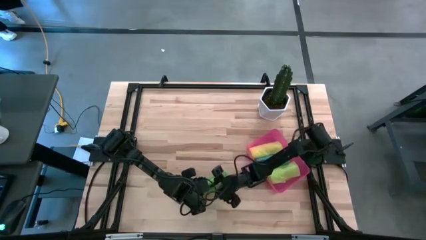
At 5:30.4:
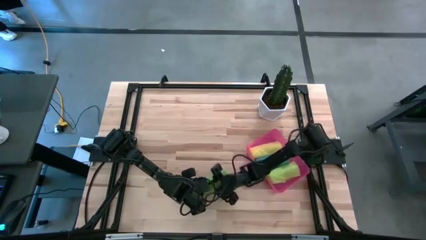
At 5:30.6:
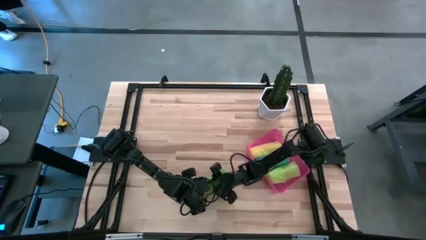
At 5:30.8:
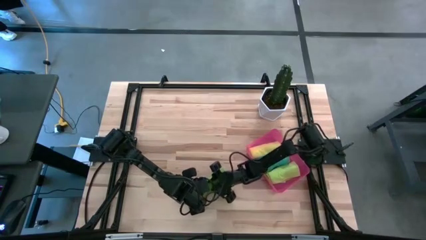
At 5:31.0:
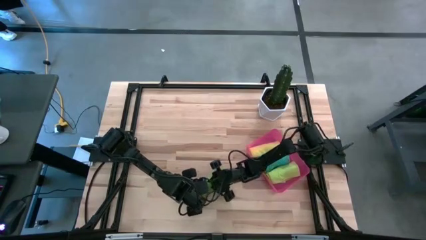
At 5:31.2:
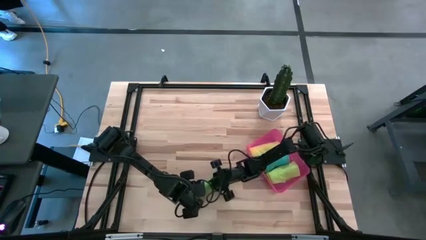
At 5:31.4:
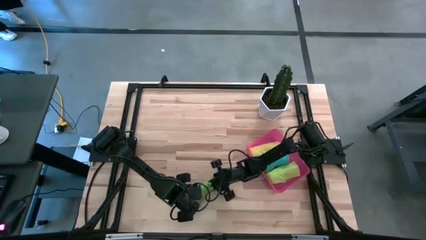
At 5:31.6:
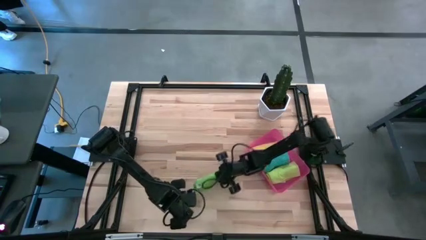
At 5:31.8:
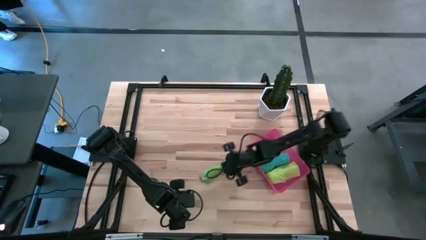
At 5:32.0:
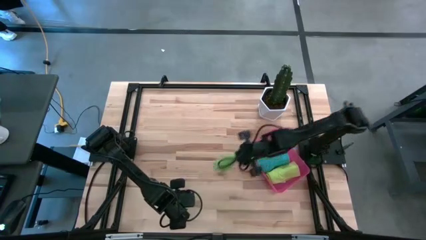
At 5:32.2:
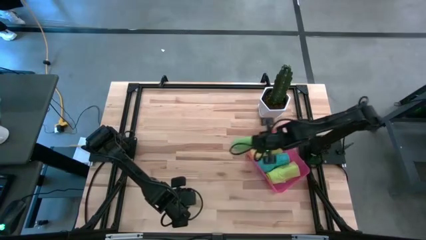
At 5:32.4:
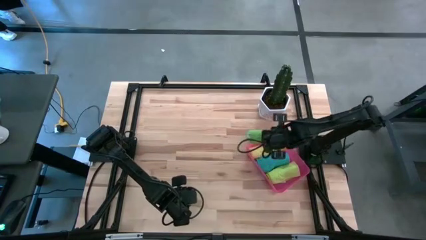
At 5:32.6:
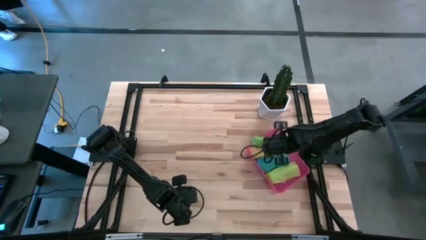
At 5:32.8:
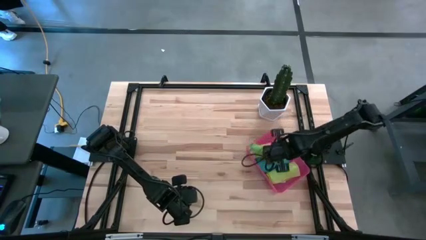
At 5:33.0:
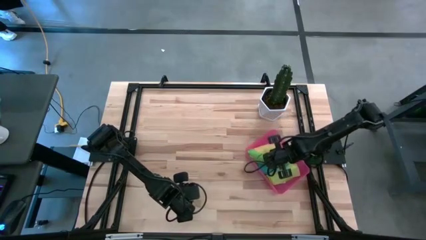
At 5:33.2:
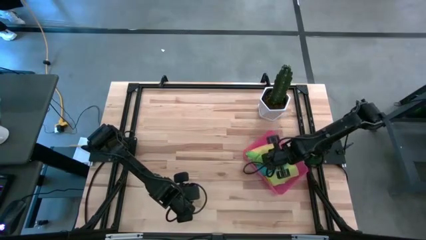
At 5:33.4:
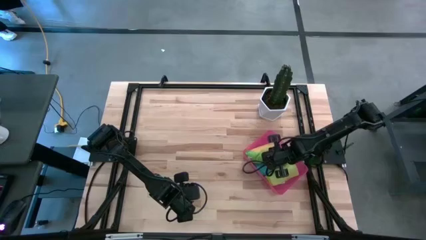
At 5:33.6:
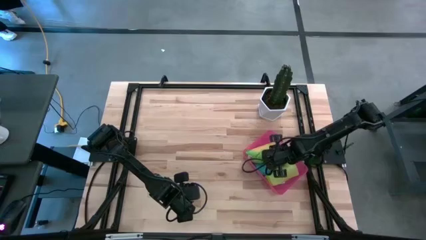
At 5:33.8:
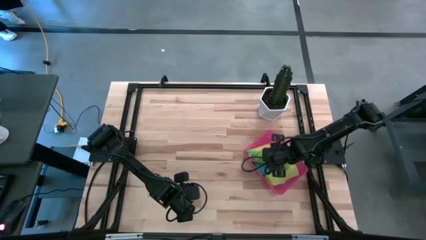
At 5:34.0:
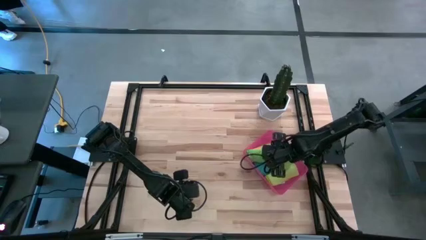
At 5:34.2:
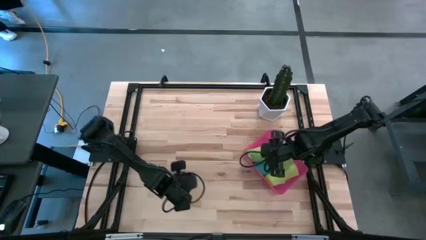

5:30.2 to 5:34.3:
Task: Roll microfiber towels into tight, uniform cylinder then place into a basket
Put the green microfiber towel in the pink bin

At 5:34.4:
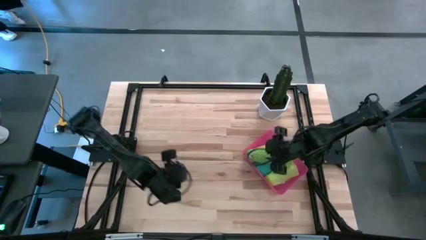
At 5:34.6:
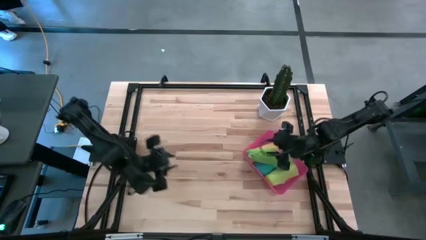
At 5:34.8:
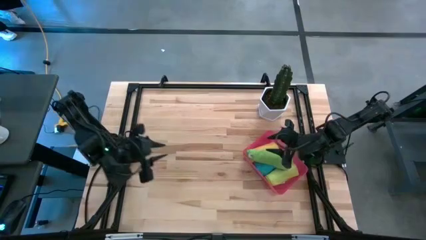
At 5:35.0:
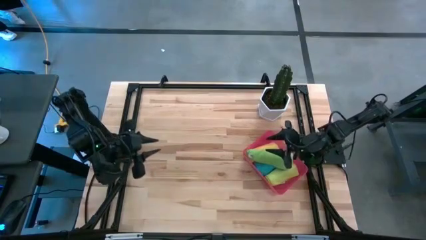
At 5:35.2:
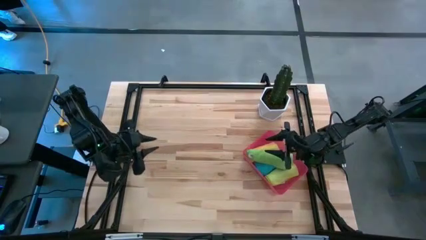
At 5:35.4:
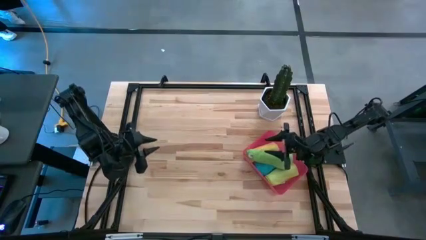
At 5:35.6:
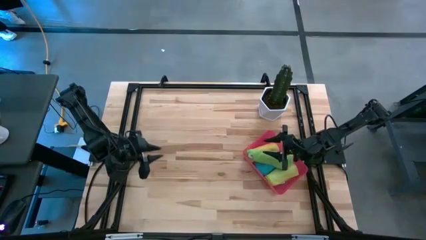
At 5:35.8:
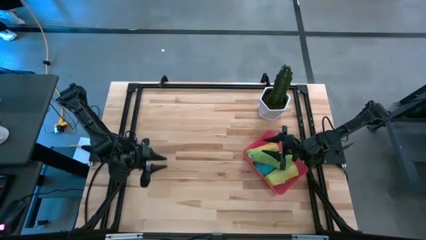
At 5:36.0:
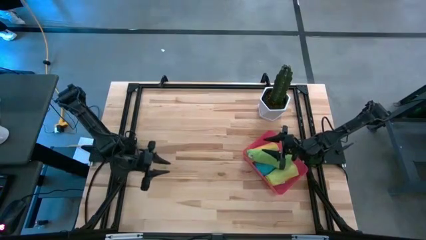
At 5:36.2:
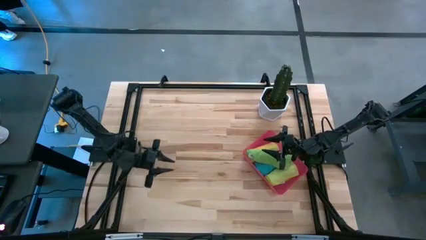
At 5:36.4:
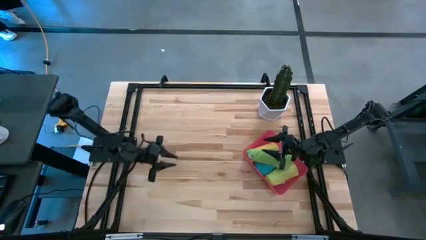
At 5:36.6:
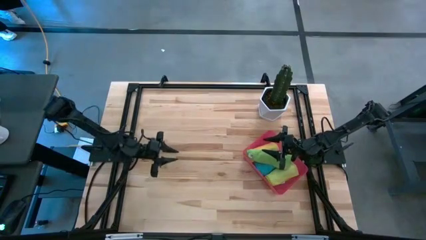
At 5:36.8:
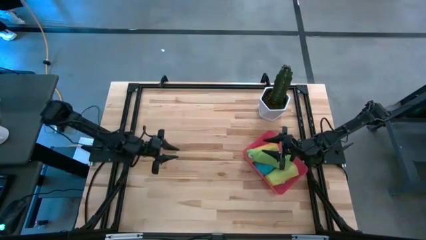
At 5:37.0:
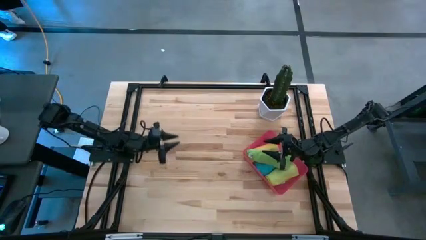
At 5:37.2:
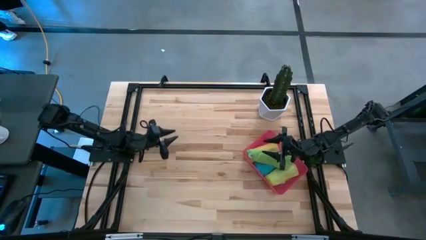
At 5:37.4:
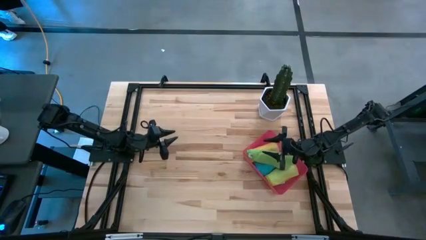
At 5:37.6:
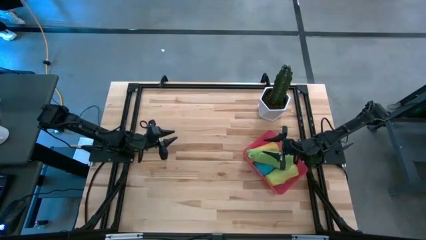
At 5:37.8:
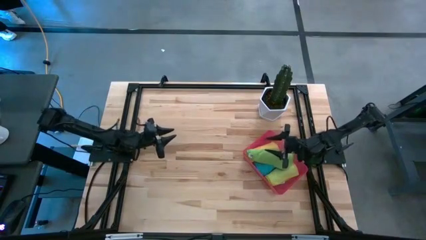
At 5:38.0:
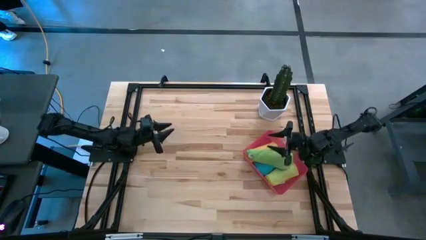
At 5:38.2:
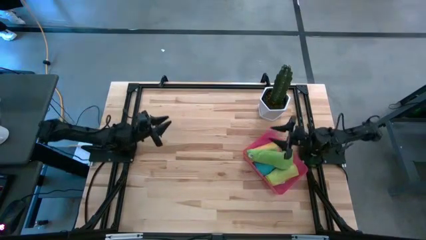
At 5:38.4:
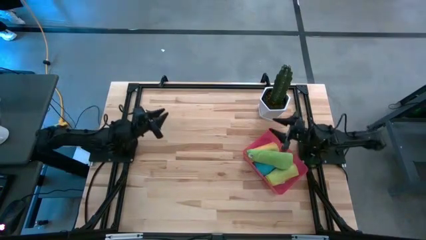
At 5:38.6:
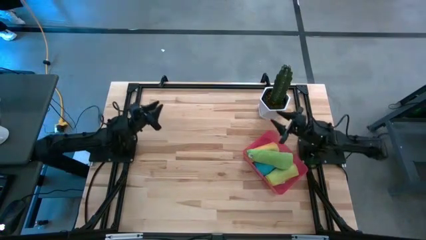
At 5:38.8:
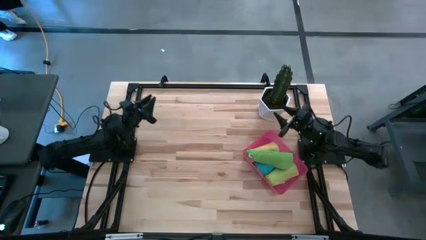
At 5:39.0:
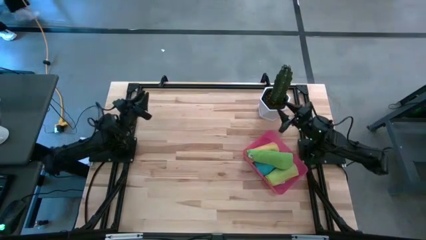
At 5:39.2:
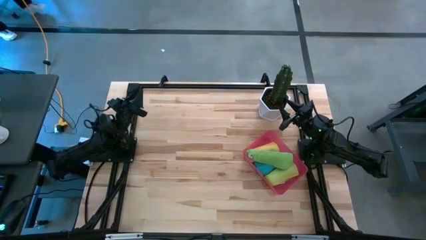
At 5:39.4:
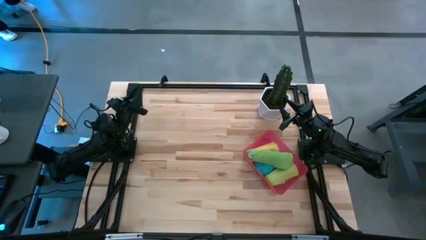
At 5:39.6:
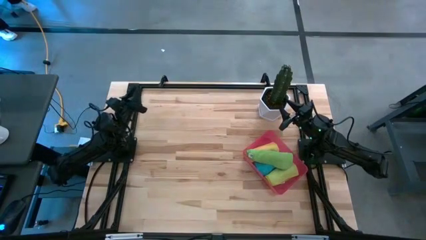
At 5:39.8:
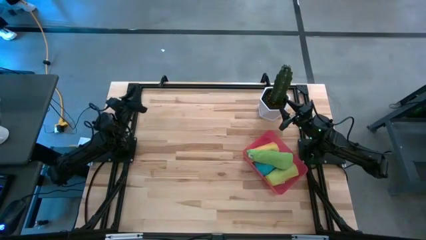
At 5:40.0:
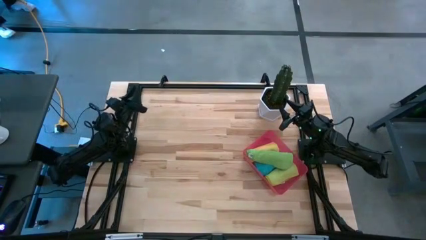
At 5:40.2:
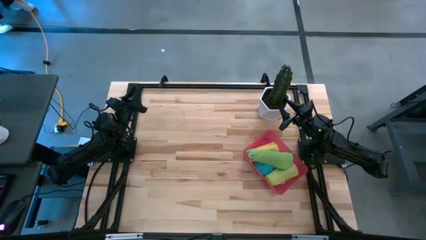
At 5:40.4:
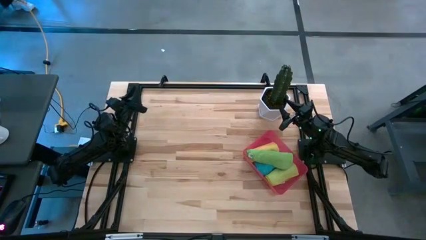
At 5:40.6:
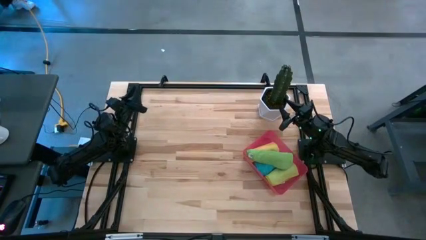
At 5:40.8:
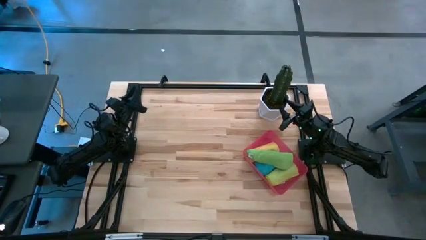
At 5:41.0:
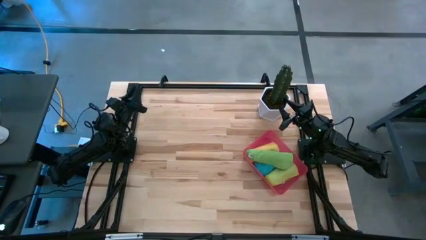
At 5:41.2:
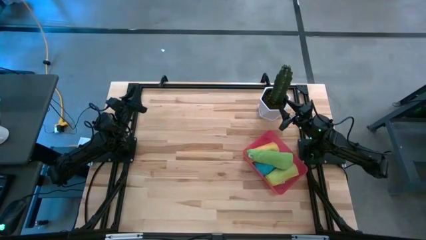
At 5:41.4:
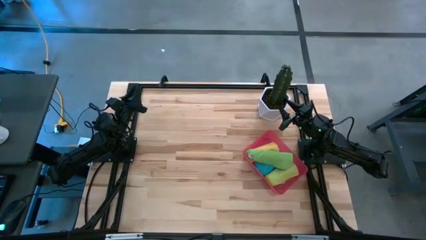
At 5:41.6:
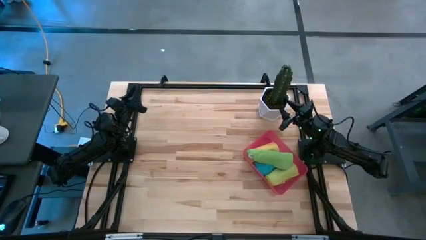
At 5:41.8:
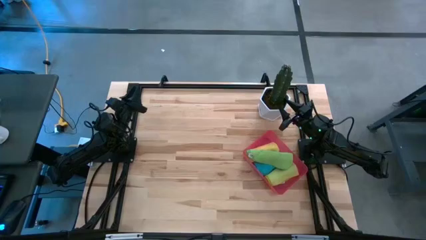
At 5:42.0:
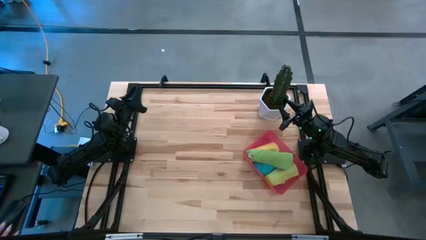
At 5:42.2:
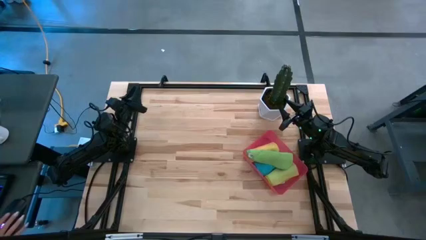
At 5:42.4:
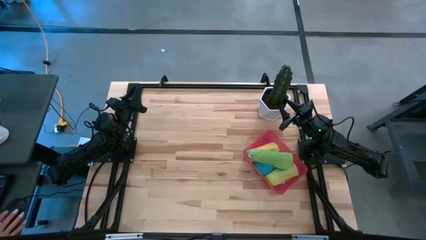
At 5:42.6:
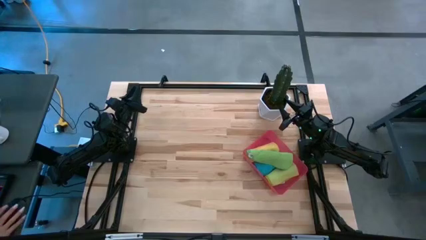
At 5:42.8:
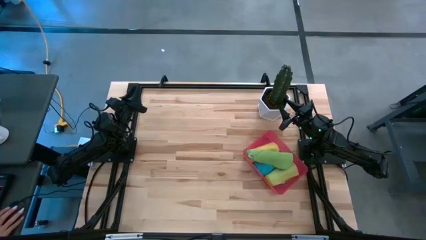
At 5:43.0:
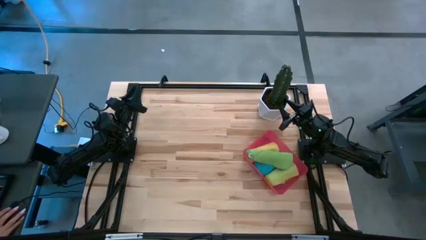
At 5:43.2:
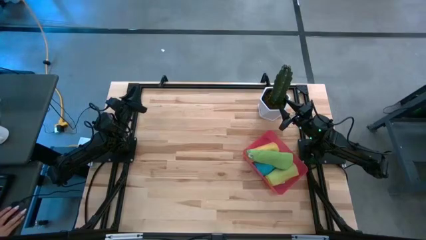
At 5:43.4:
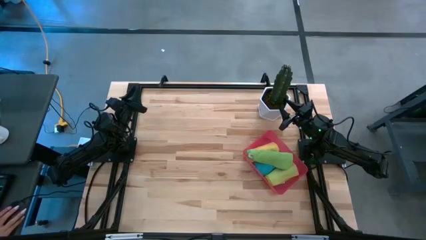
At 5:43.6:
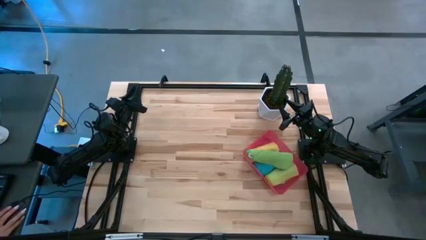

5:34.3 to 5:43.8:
Return to Home Position

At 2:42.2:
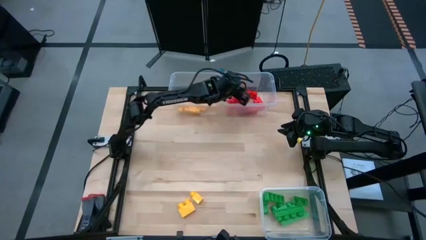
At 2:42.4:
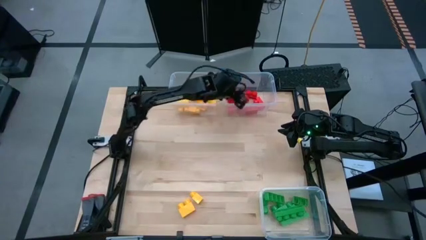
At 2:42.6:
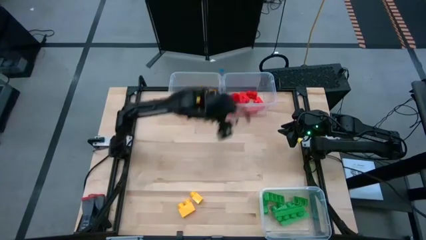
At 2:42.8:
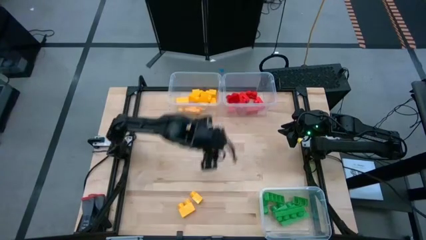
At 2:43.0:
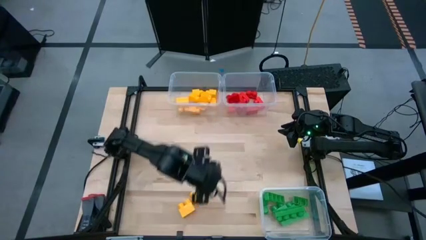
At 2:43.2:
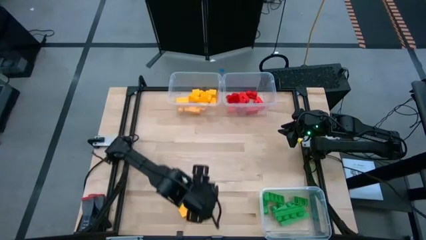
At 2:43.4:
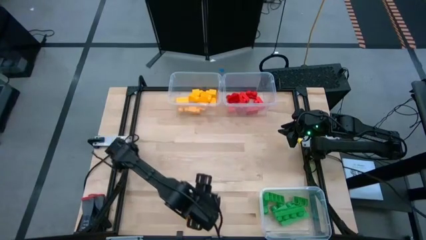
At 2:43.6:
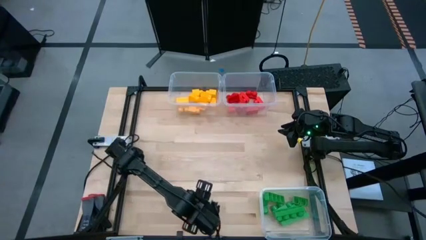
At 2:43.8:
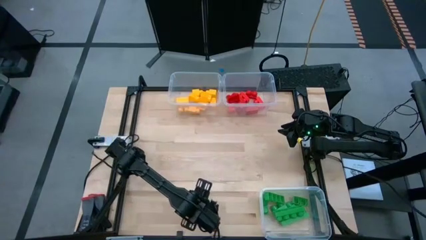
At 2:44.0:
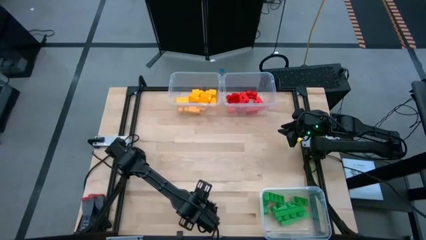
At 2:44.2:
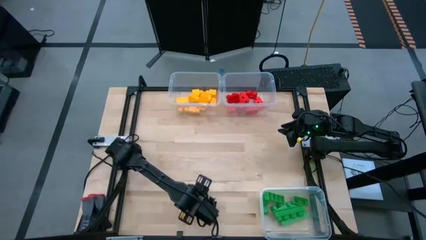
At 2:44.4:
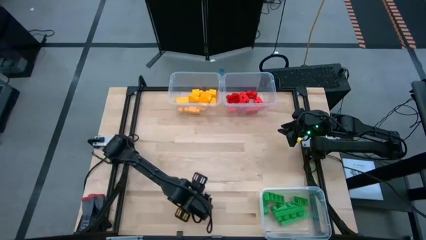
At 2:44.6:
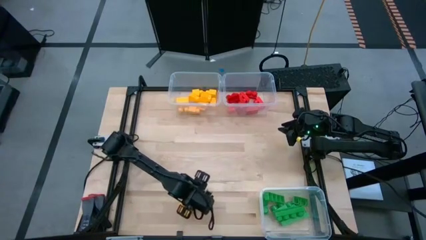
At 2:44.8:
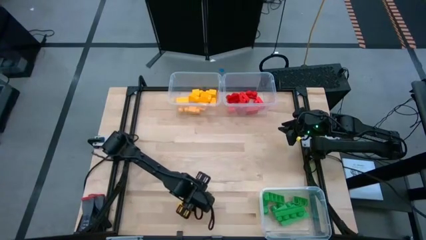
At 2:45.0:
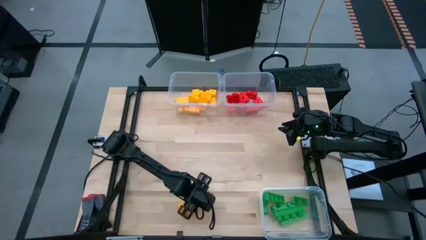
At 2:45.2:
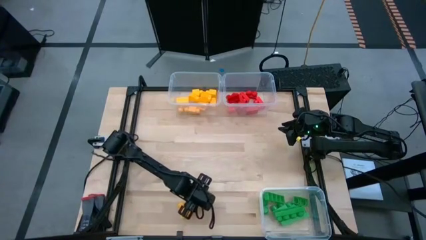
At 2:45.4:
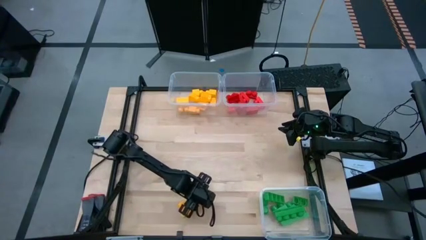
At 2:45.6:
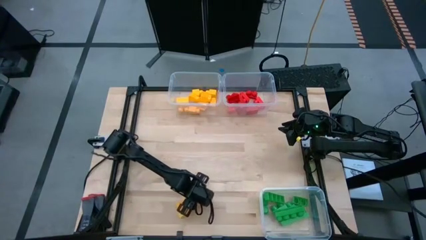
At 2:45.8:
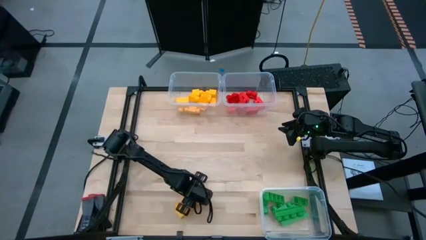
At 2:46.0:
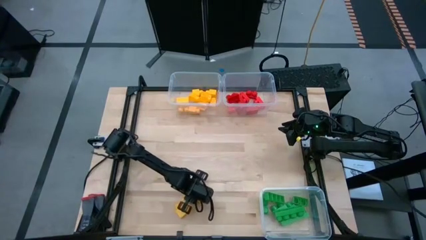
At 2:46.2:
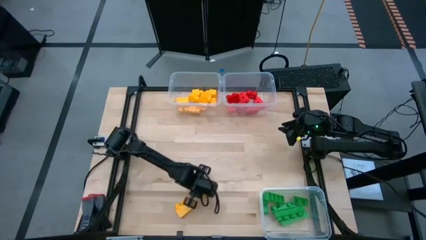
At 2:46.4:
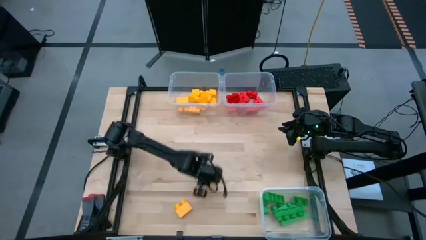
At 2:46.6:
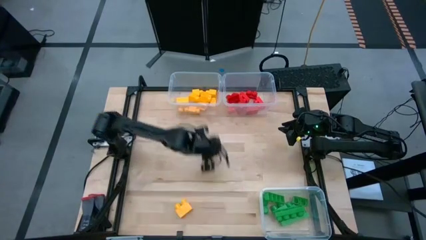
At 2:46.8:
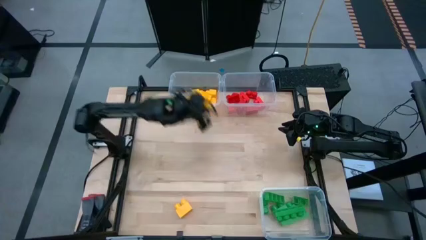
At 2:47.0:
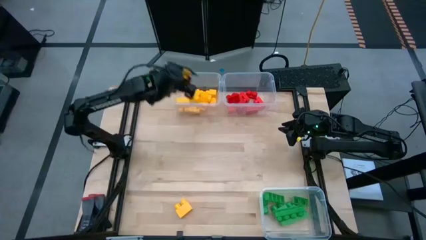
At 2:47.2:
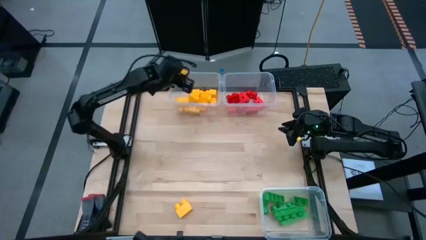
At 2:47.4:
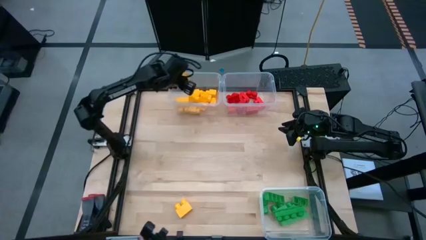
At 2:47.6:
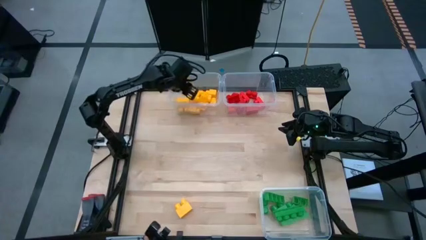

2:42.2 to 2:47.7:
Task: Sort blocks
Put the yellow game piece into the top left transparent bin
